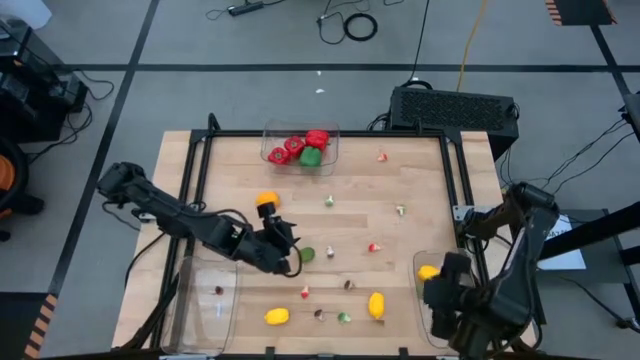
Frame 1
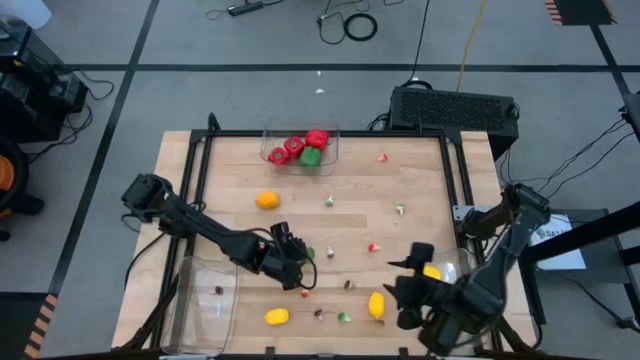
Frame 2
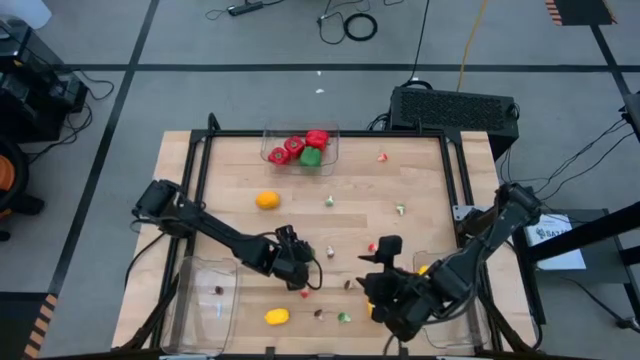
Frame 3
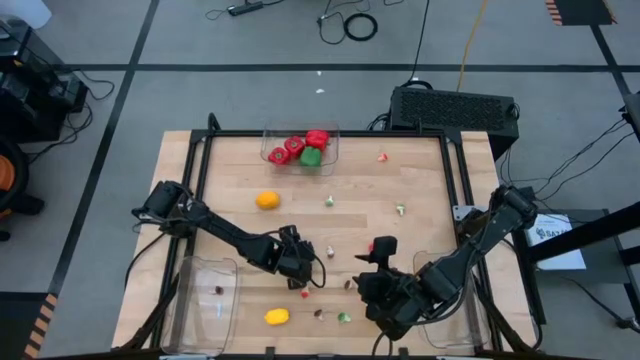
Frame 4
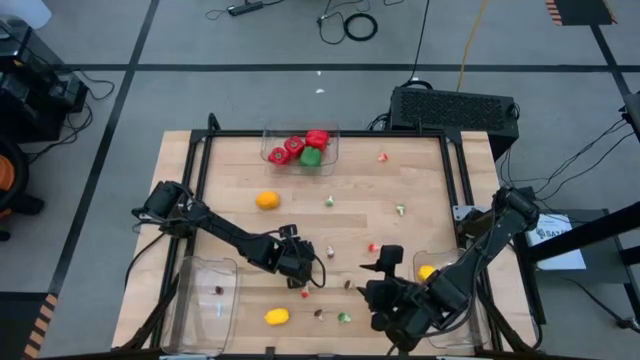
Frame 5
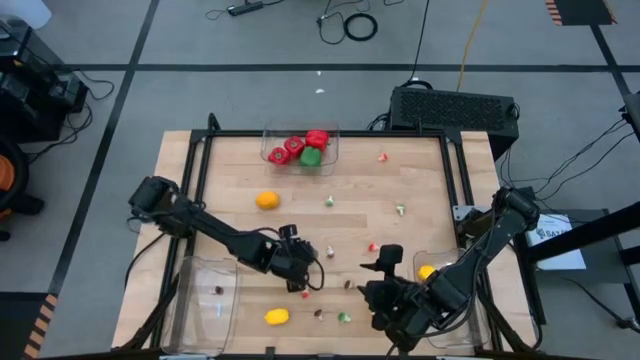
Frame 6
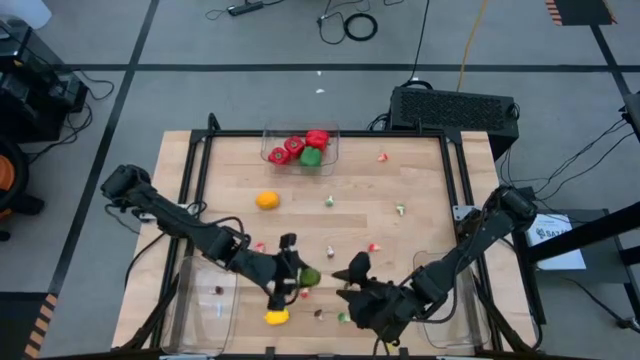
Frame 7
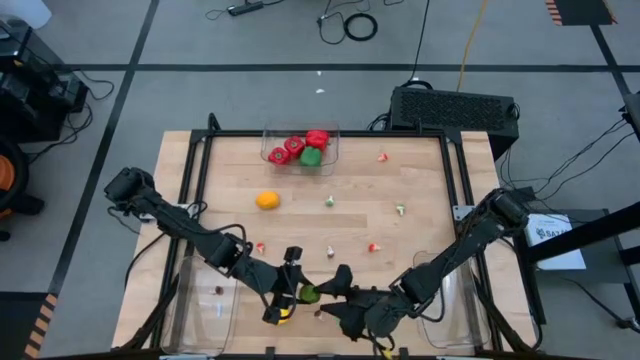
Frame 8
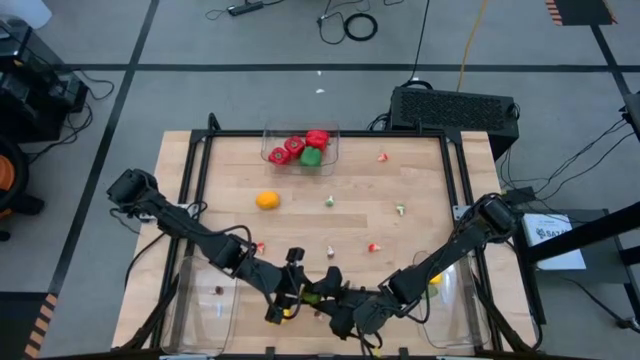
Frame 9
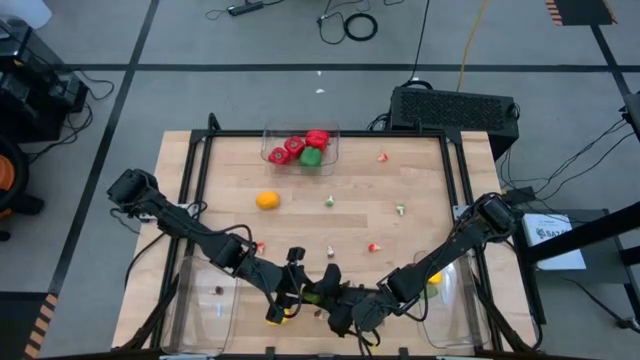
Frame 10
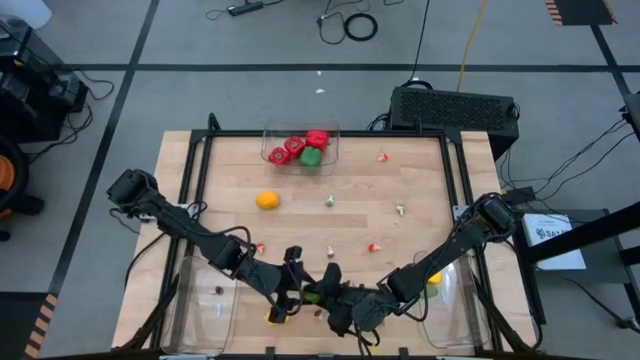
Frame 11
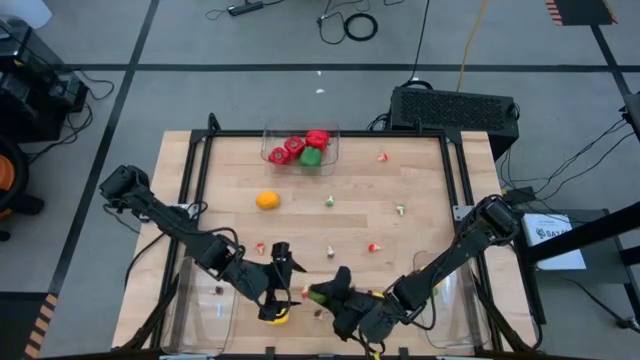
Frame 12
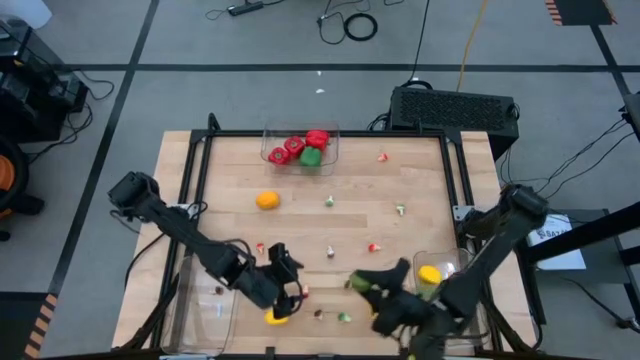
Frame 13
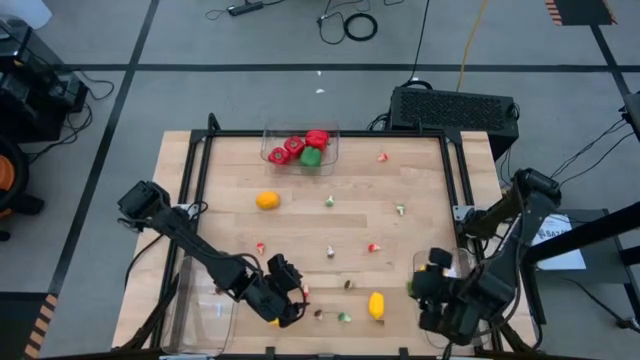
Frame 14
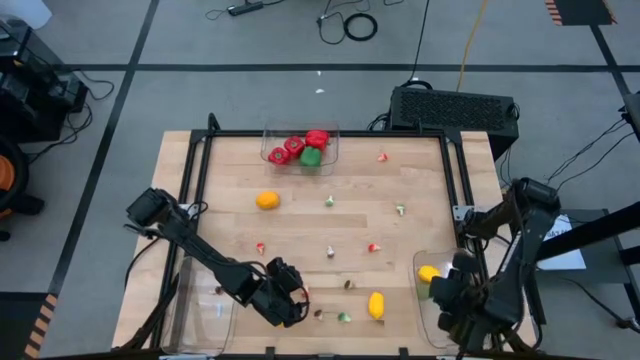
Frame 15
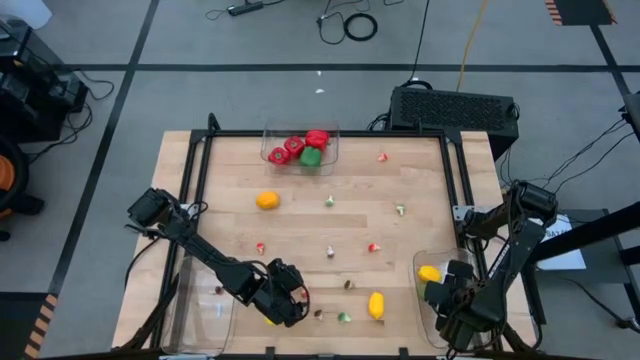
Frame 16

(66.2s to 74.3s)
Task: Sort produce into baskets
Put the green lime into the bottom right transparent bin

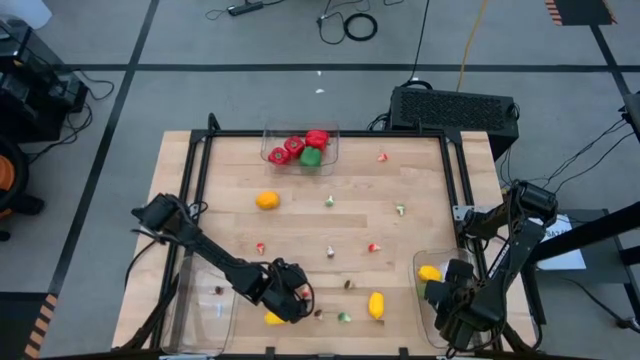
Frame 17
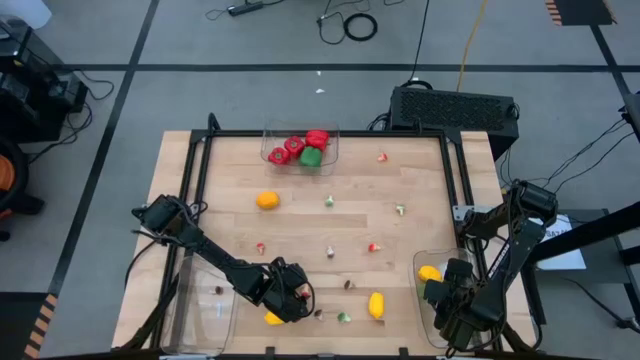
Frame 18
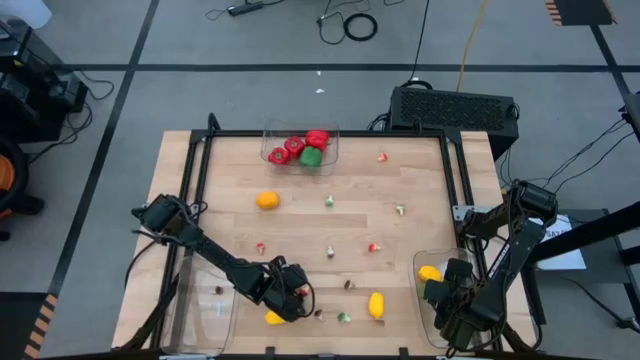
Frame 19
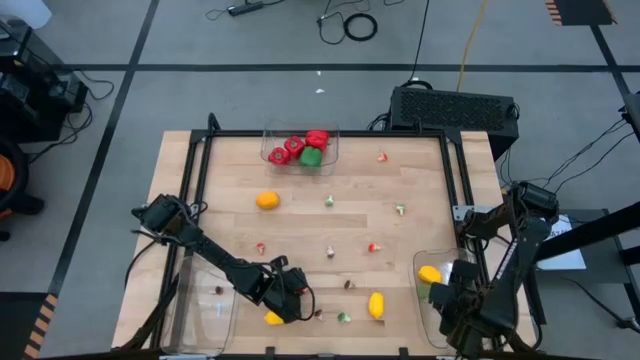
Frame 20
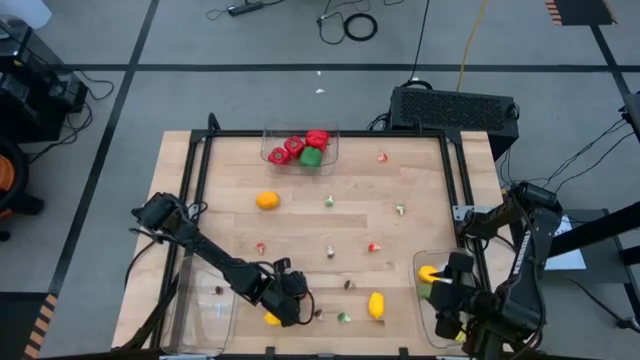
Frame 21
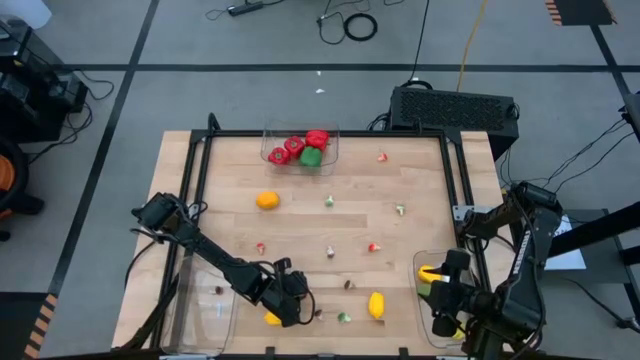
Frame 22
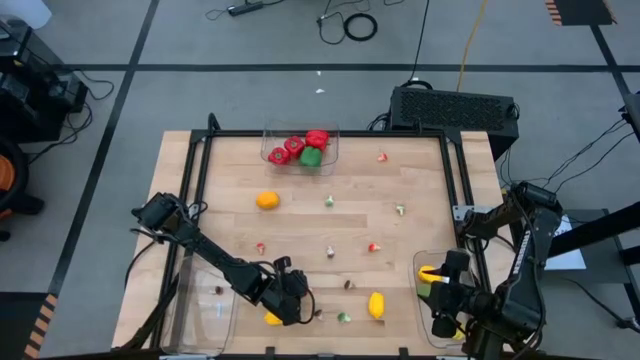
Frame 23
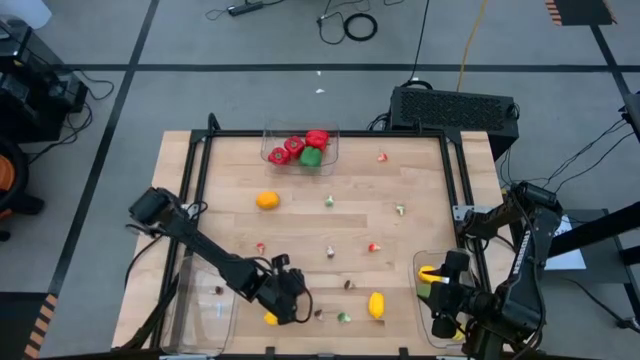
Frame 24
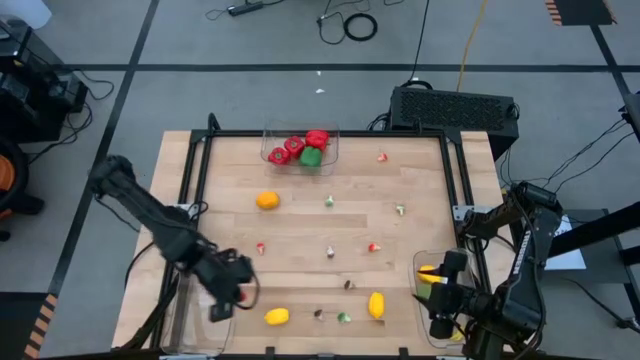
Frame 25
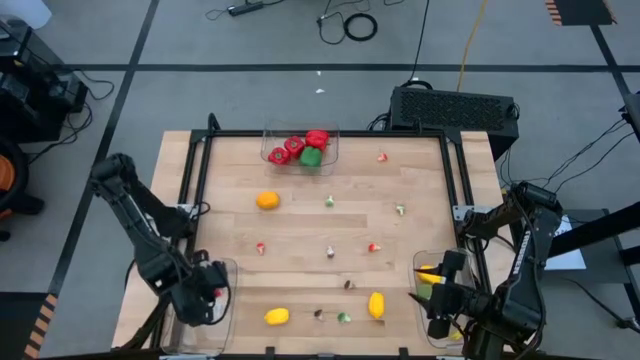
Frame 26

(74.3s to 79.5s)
Put the red mushroom into the bottom left transparent bin

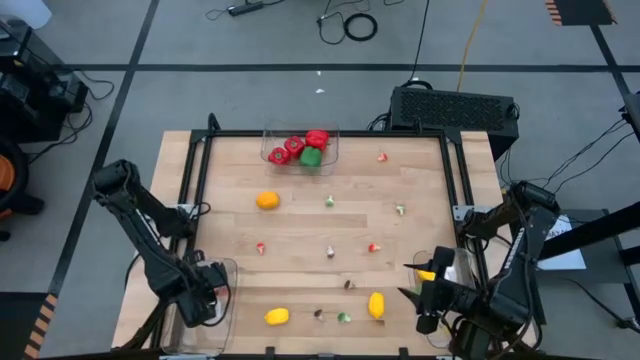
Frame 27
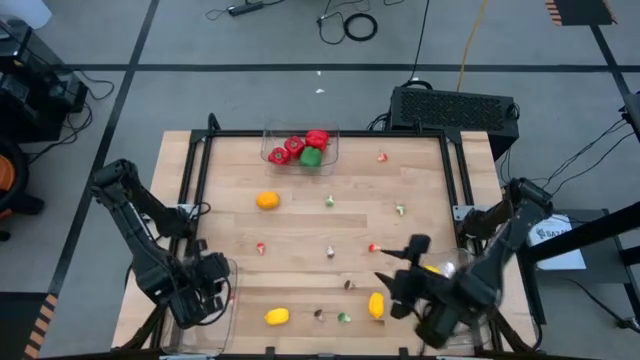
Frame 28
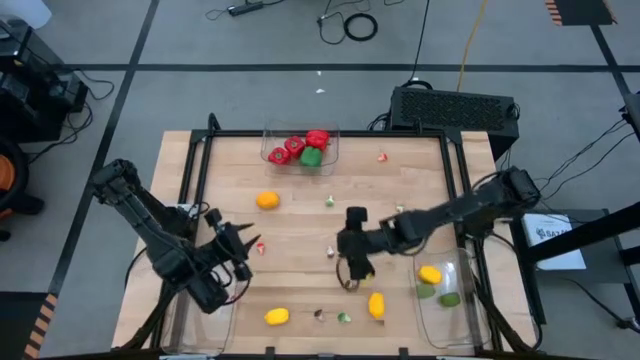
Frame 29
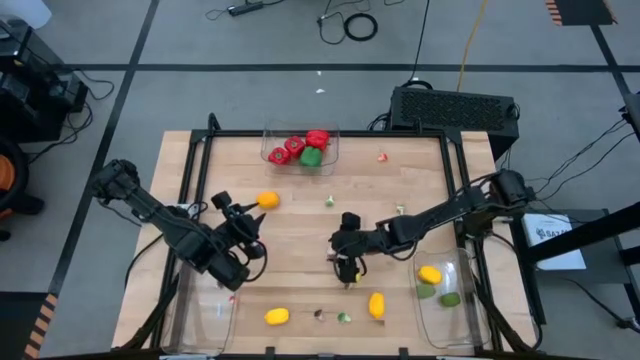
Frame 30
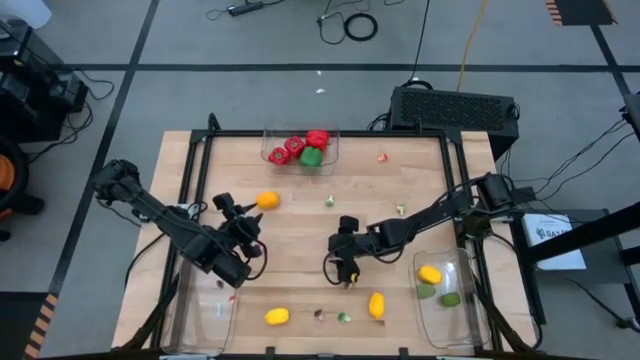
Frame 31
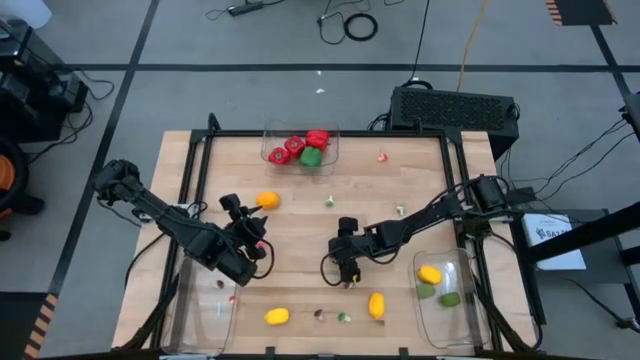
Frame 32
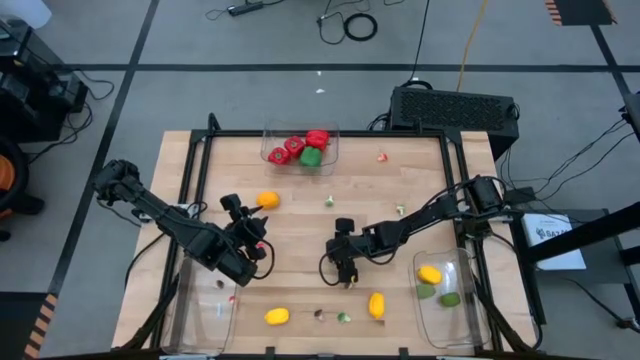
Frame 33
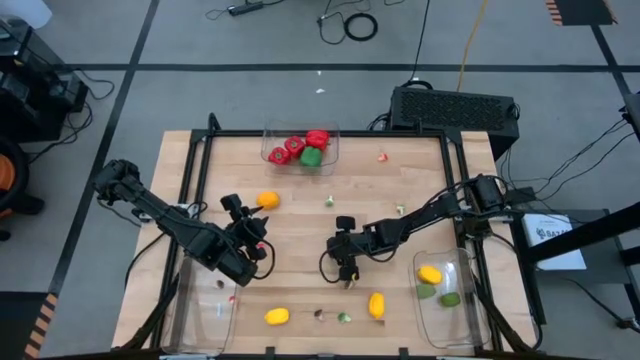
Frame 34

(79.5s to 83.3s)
Put the brown mushroom into the bottom left transparent bin

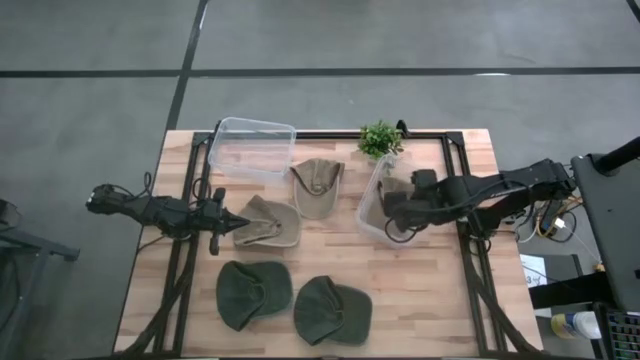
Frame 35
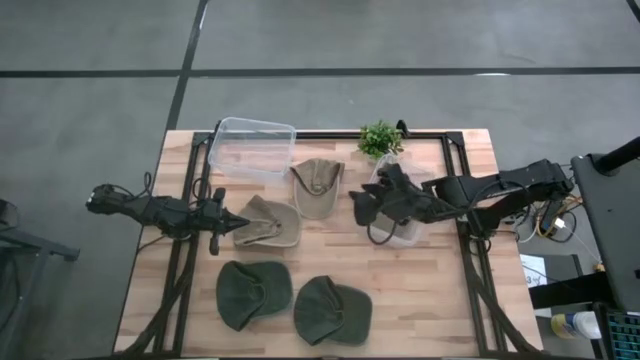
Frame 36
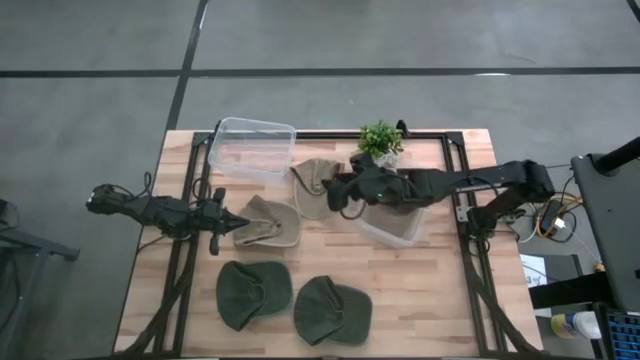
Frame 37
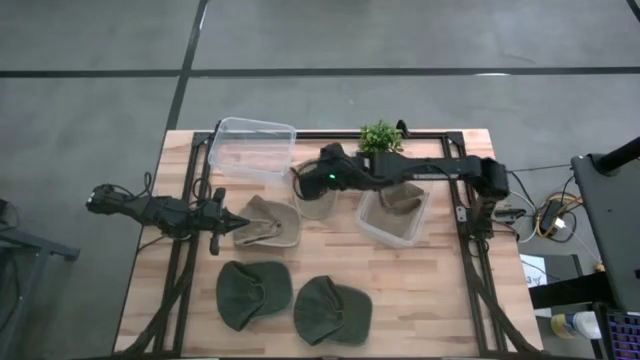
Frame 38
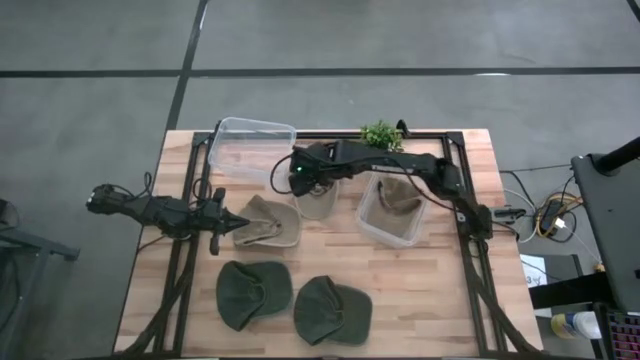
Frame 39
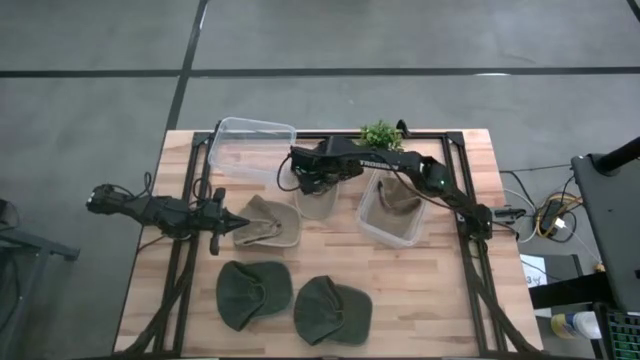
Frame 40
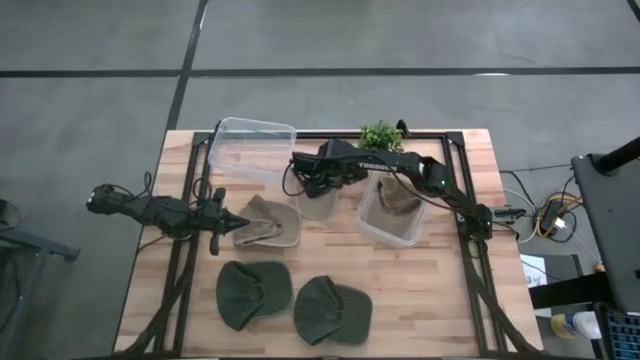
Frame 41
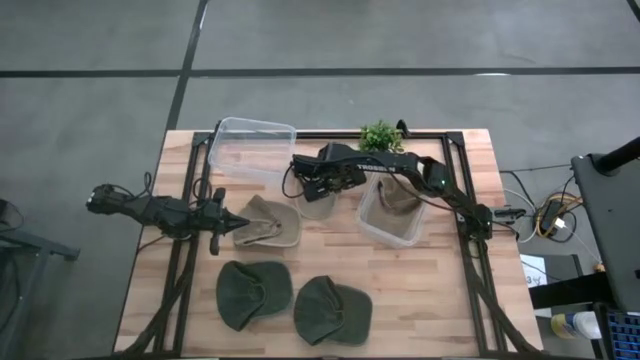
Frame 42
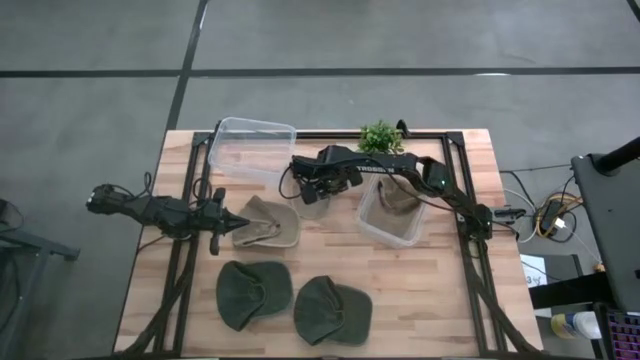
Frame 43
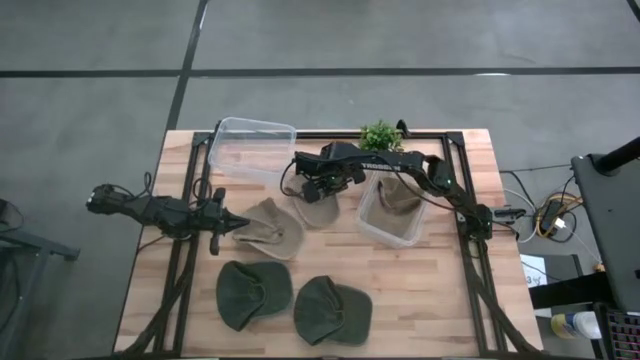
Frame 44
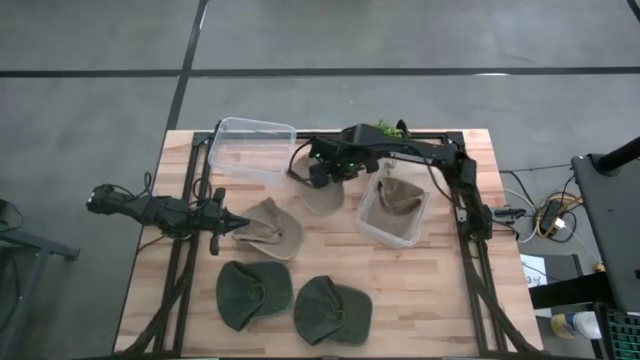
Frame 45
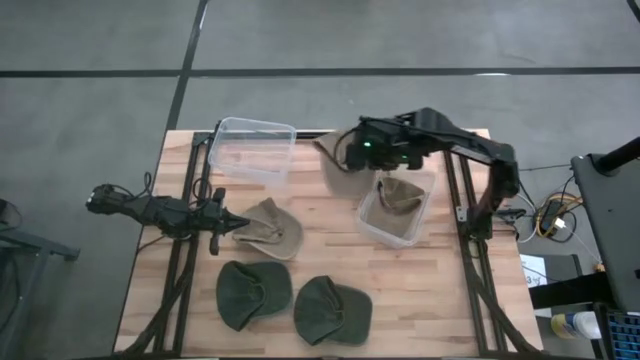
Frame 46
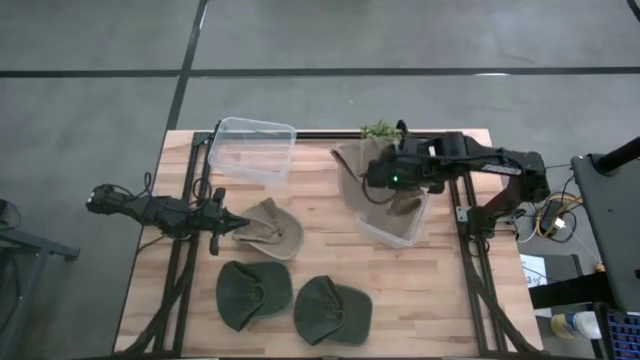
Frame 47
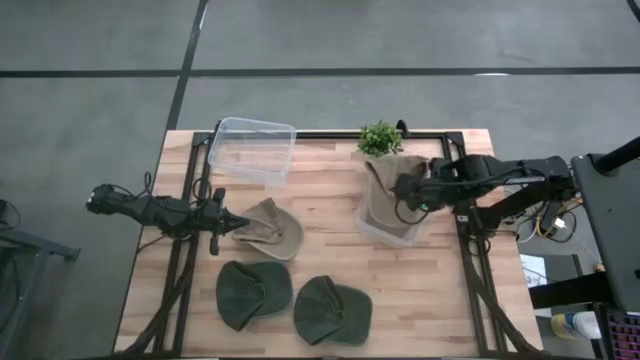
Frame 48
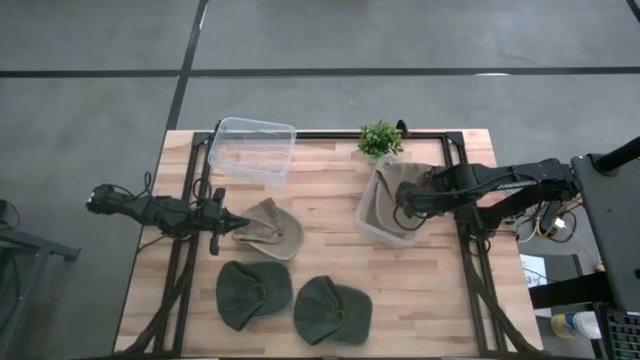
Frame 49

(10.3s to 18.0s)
Task: Pick & Place hat
Put the top brown cap into the right transparent bin
